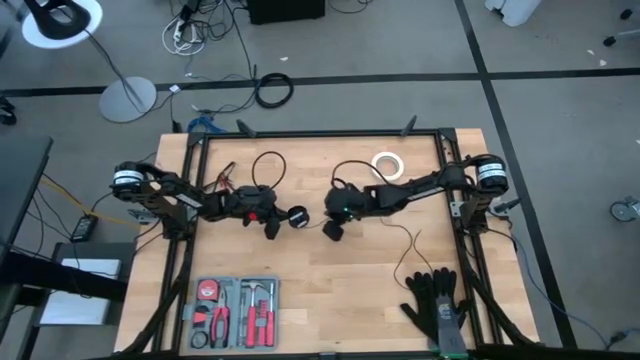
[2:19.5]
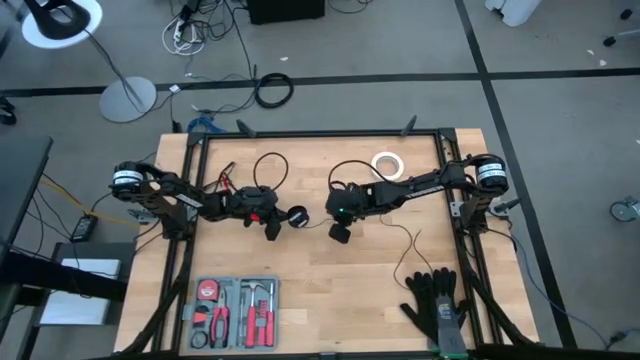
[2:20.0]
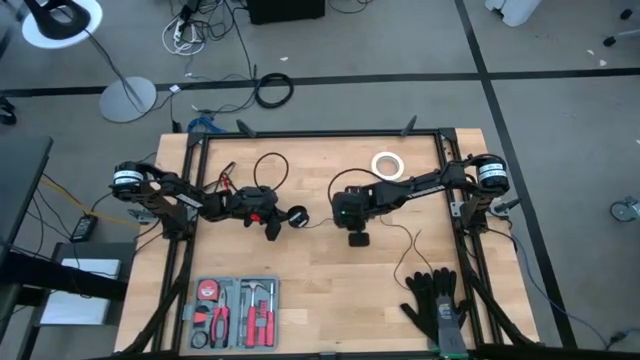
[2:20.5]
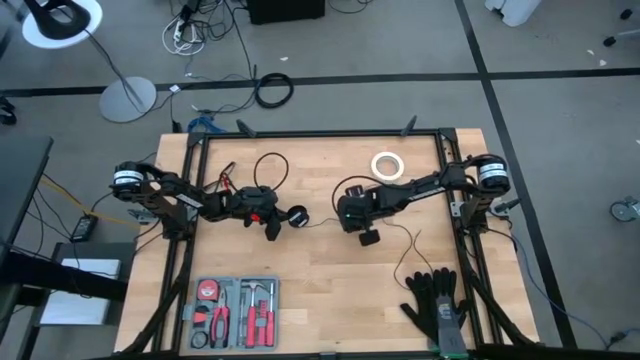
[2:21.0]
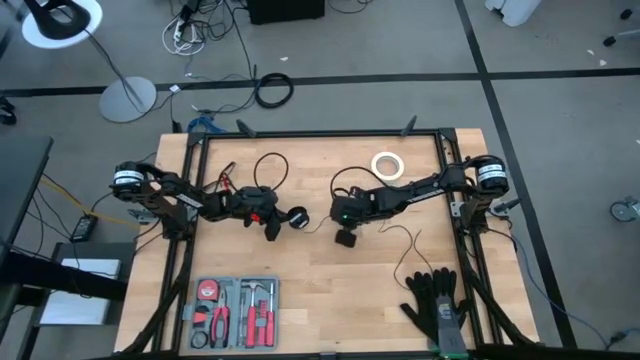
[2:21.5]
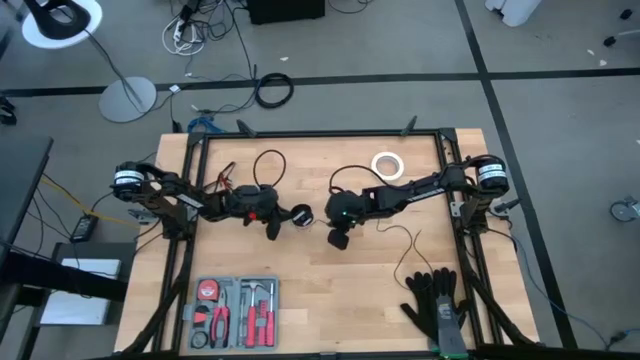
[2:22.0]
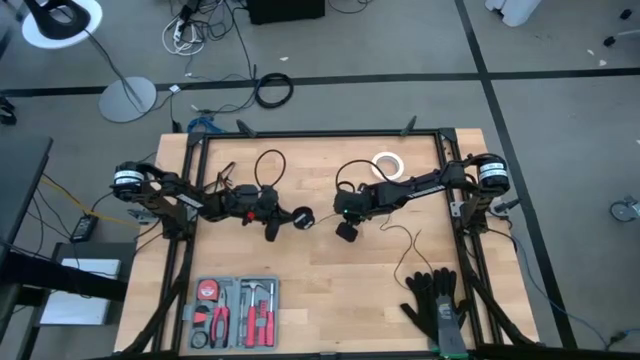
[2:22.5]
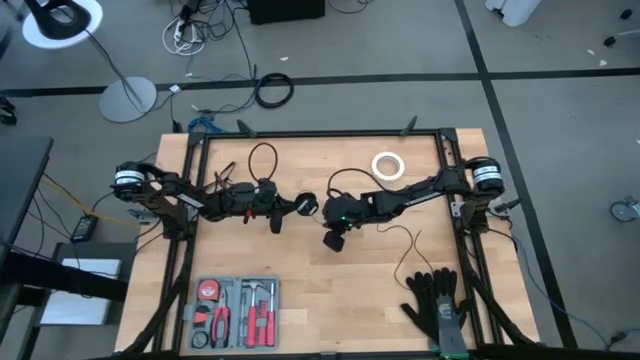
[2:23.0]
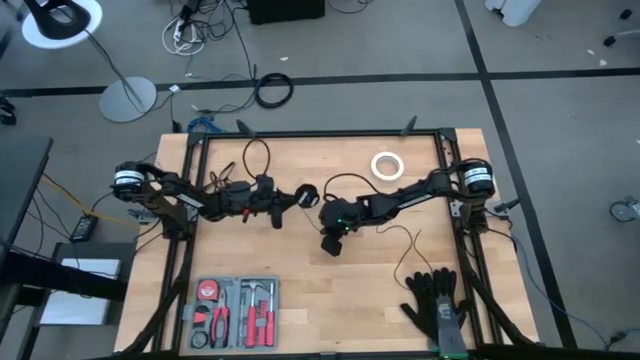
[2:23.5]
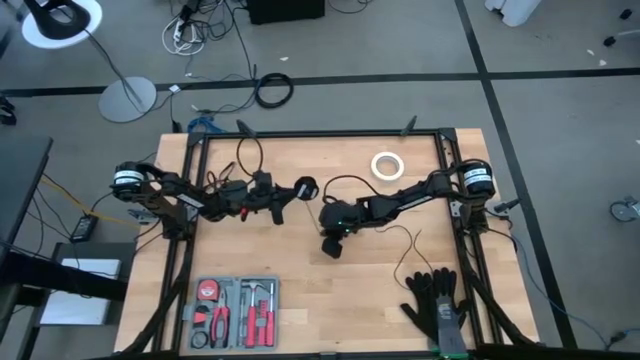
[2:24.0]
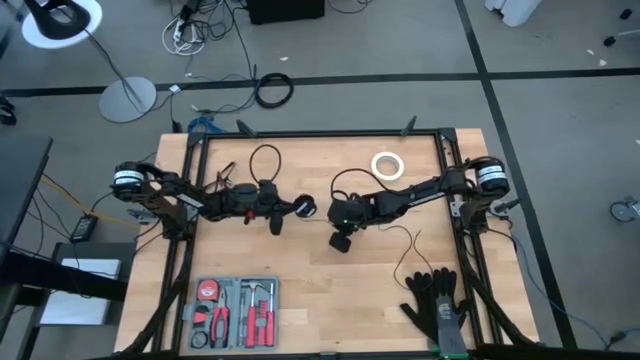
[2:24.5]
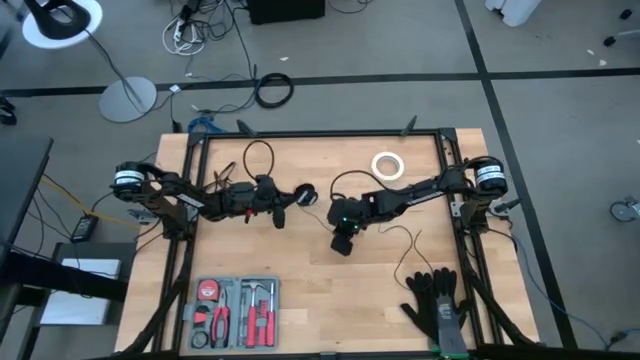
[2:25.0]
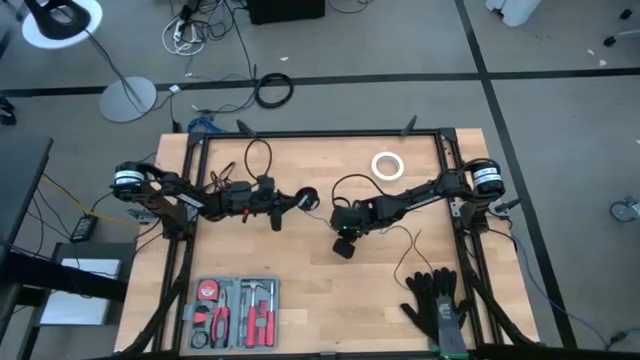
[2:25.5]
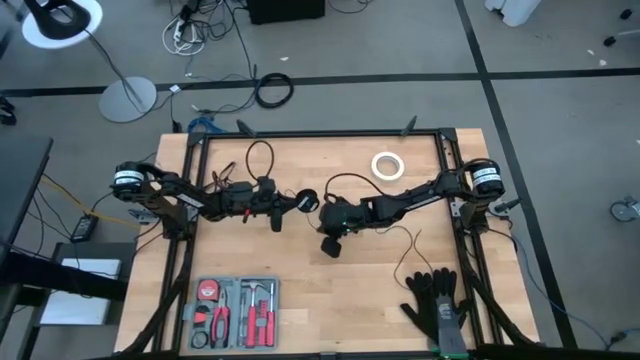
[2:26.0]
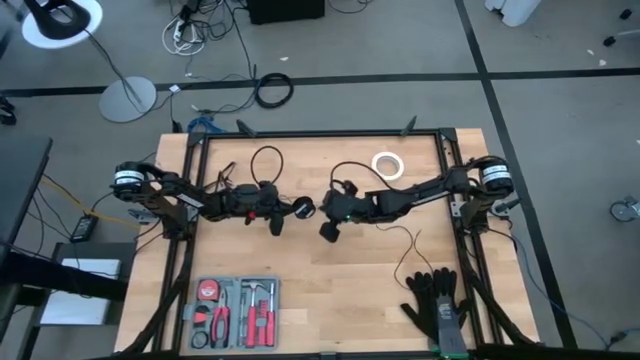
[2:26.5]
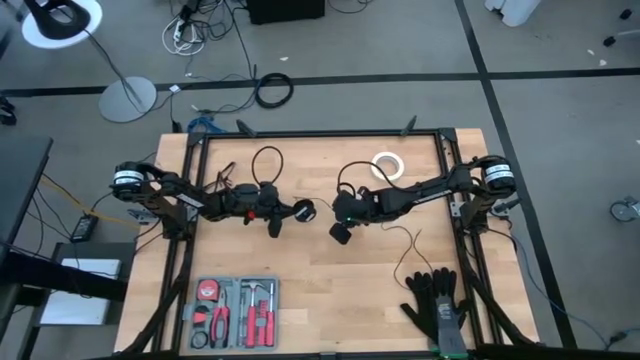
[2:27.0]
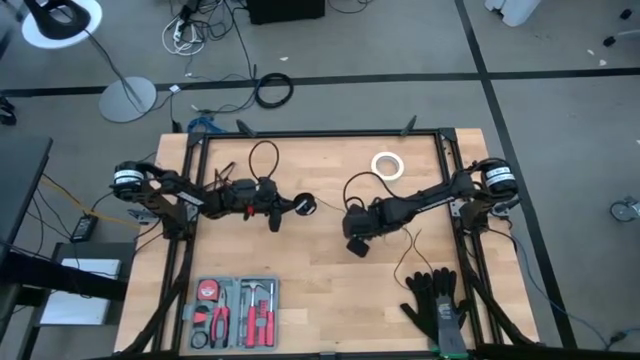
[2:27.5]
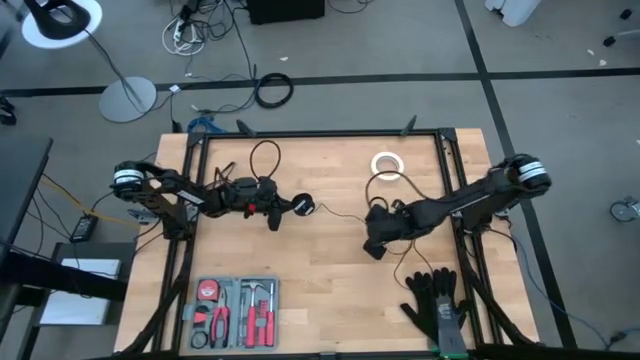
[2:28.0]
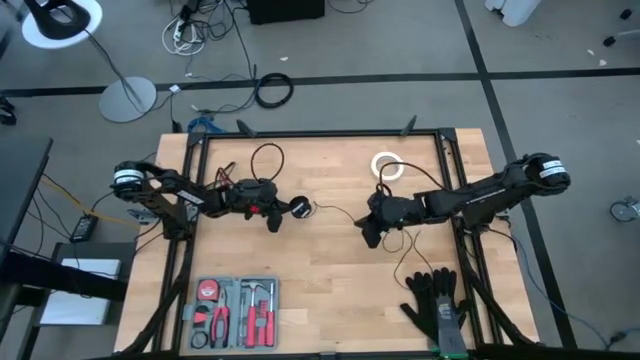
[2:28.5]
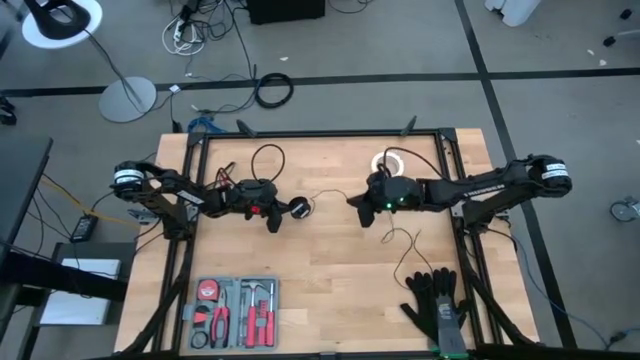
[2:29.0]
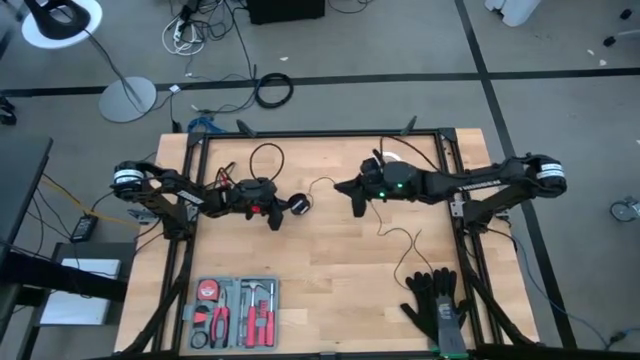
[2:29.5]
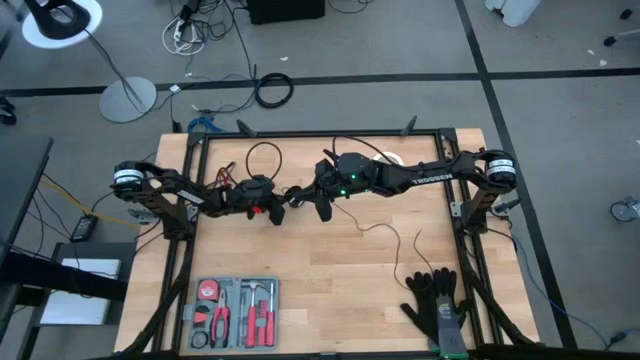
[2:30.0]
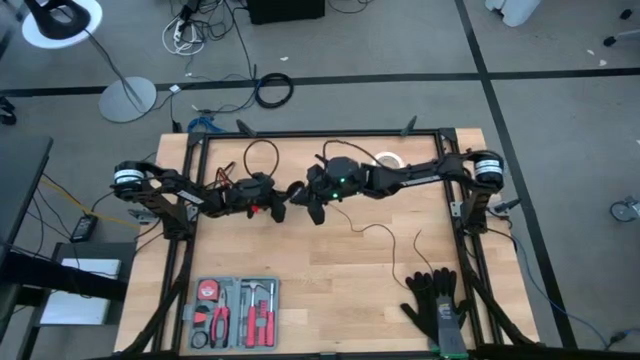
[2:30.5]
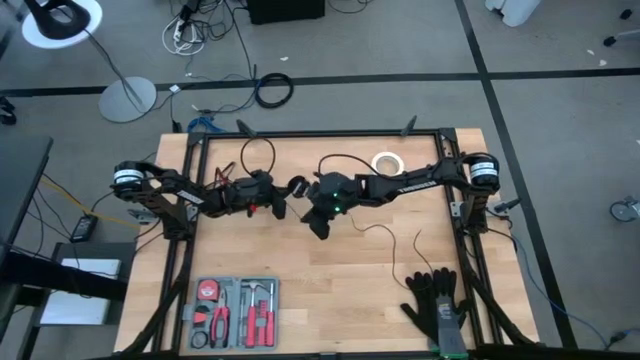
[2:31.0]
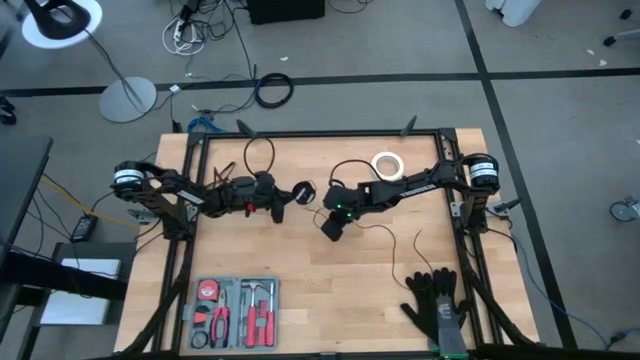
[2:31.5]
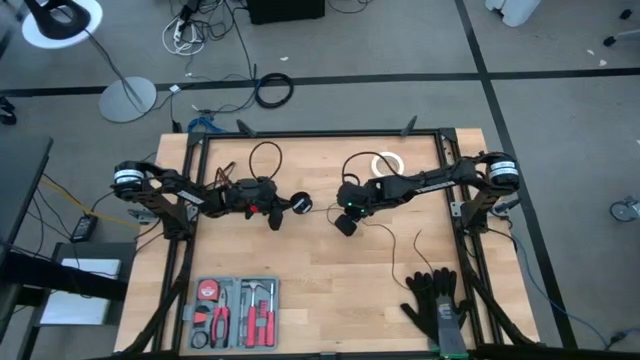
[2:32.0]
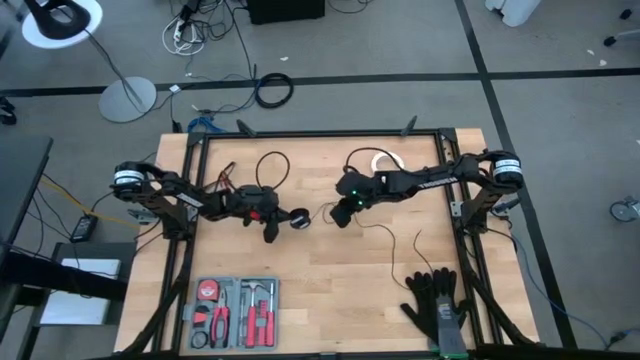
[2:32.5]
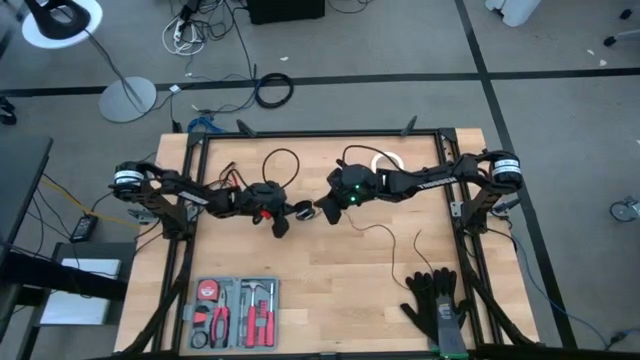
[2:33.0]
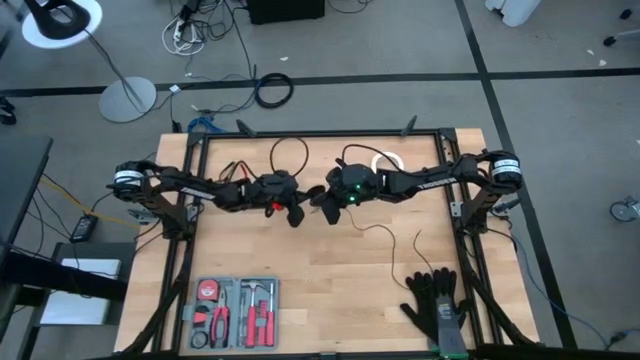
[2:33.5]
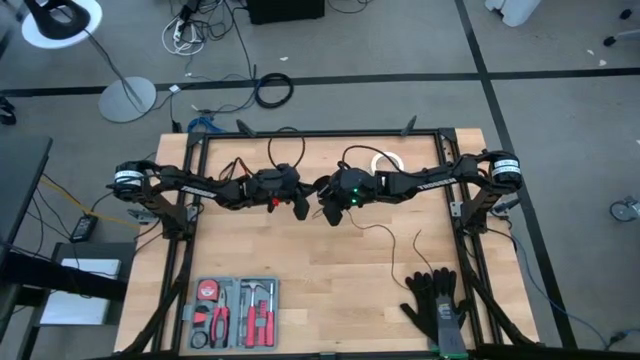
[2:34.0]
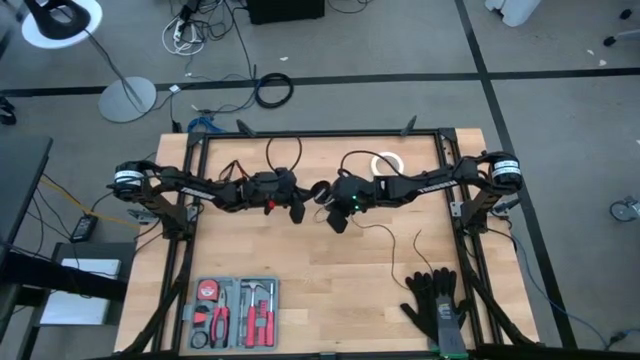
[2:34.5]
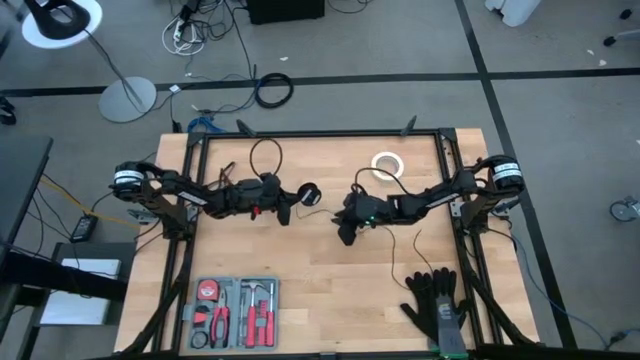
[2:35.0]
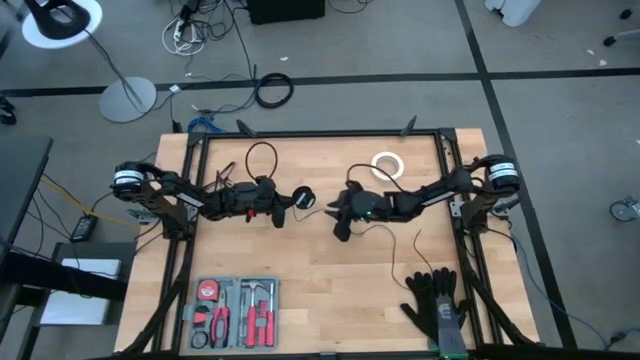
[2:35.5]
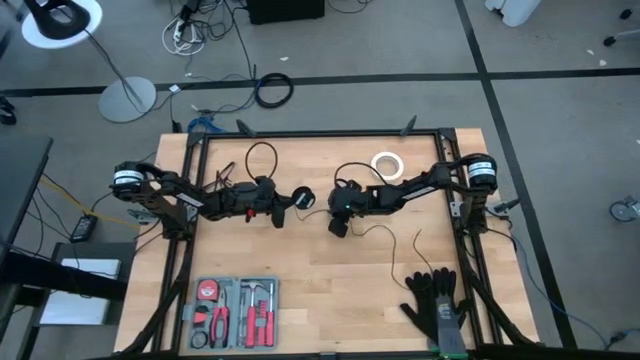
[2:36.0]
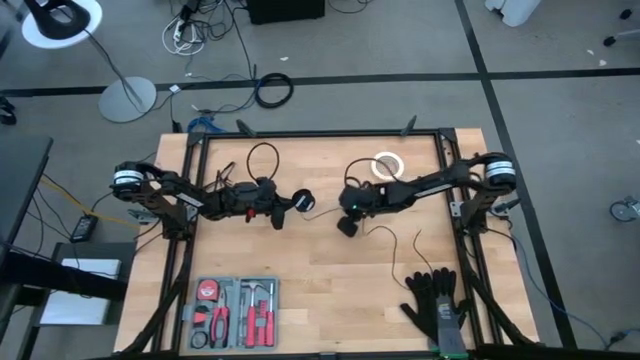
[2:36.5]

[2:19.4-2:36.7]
Task: Coil cords
Coil the black wire on the black spool

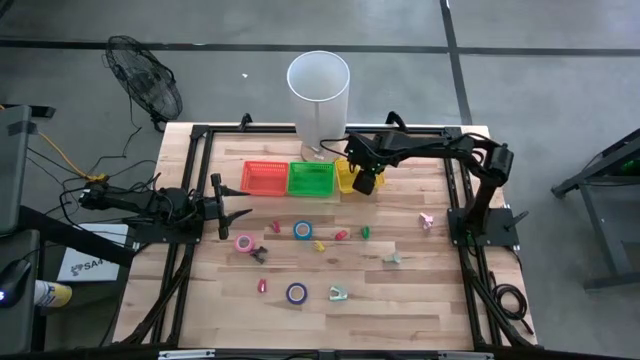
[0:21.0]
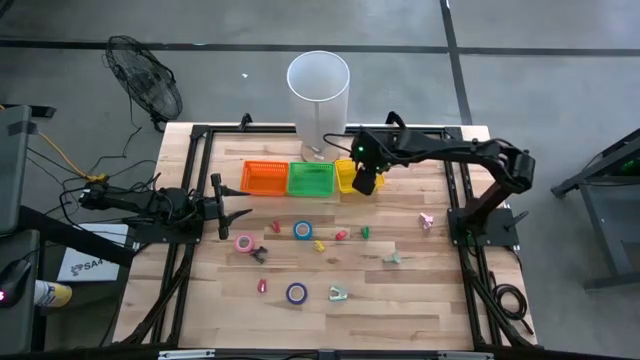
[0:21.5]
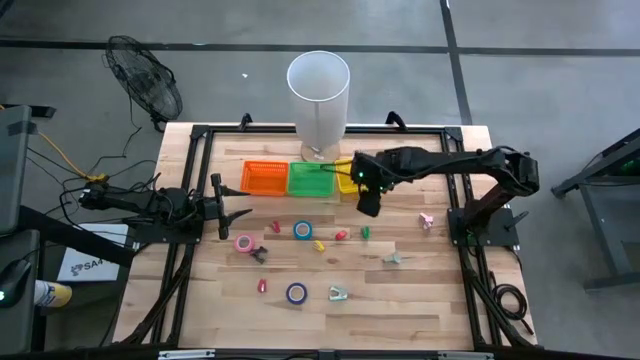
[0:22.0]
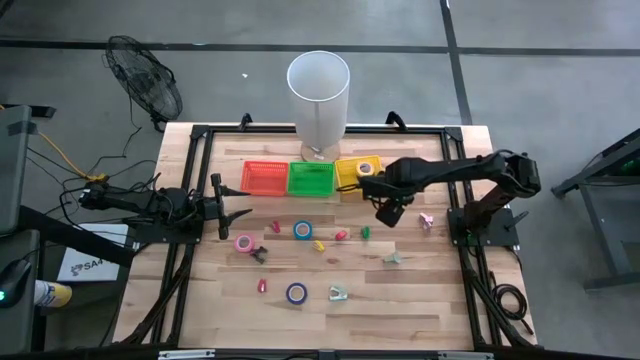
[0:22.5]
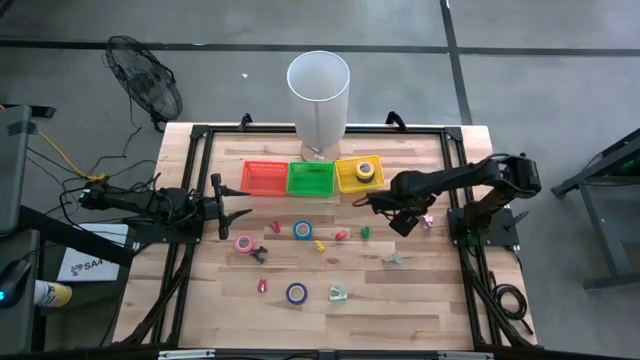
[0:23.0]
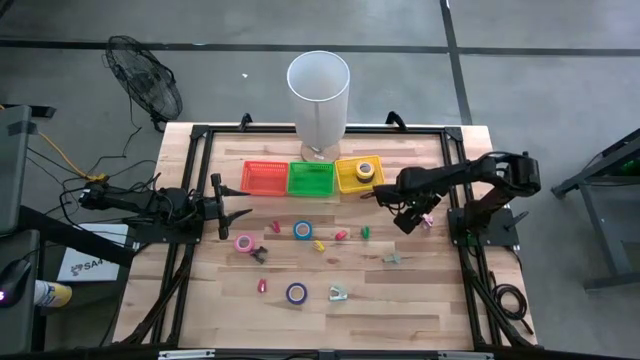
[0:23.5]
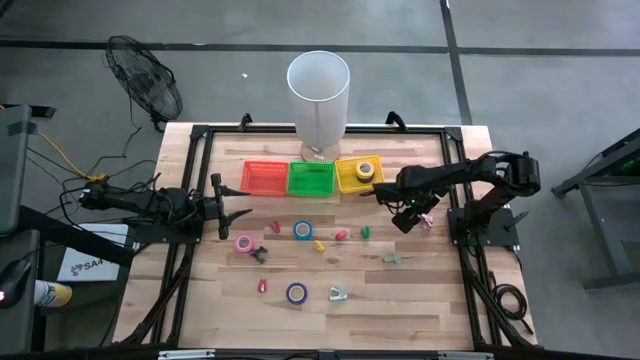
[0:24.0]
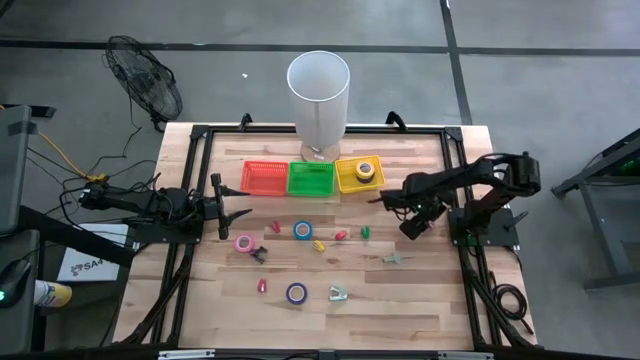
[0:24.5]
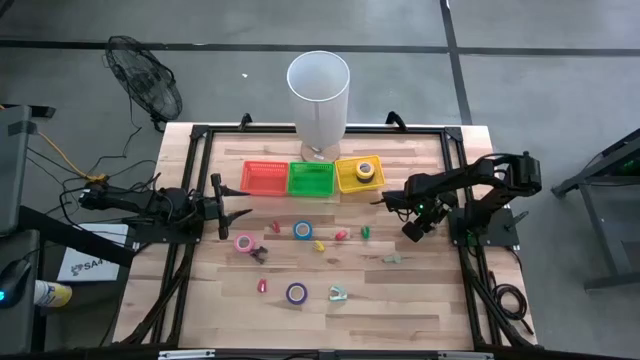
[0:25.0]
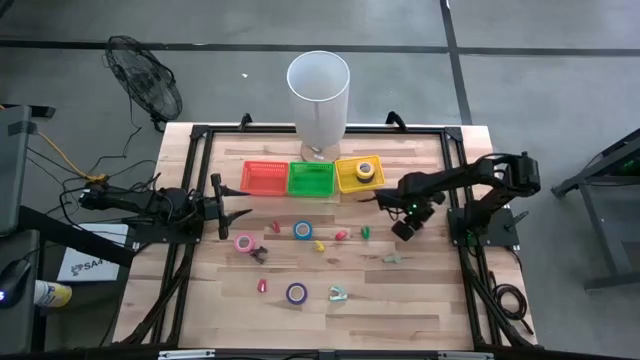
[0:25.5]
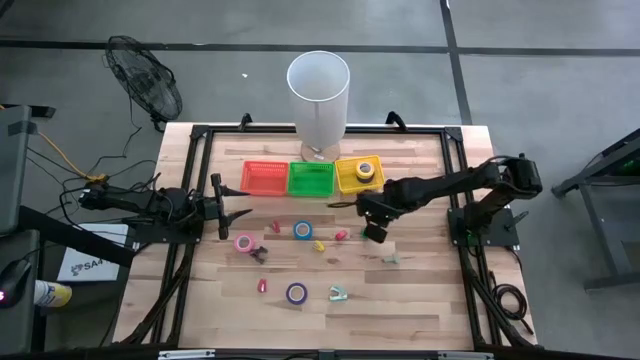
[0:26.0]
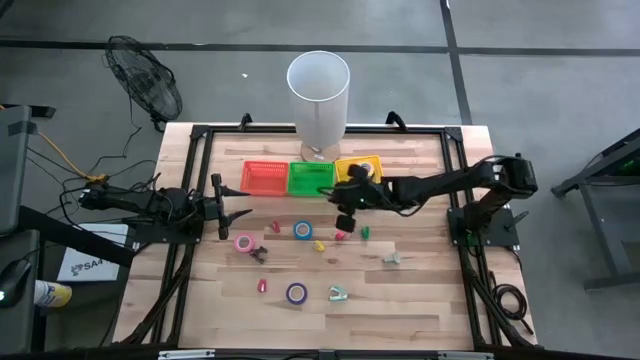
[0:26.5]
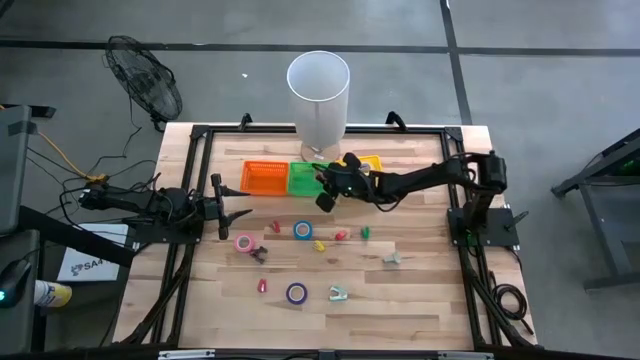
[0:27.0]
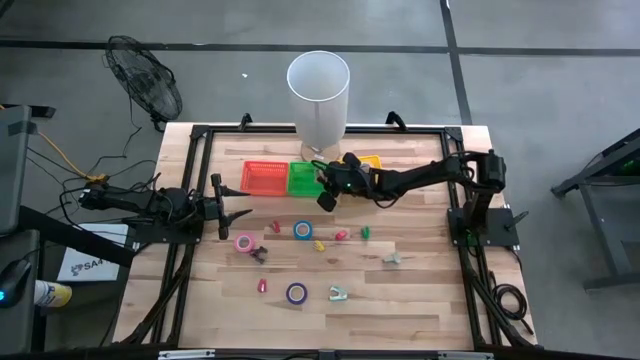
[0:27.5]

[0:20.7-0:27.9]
Task: Pick and place Stapler, Stapler remover, tape
Put the pink staple remover into the green bin
